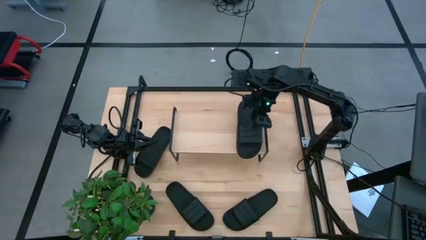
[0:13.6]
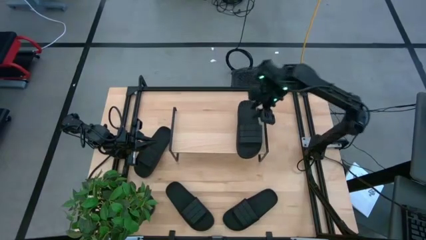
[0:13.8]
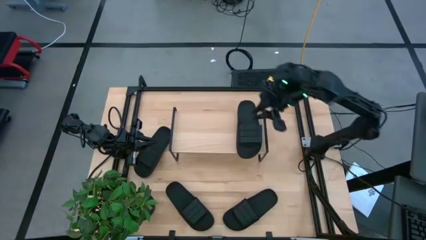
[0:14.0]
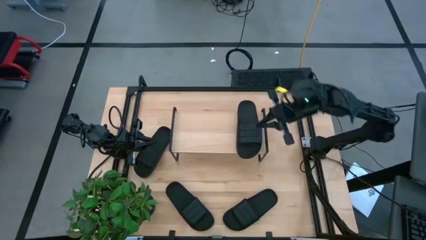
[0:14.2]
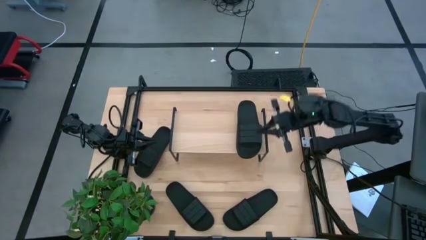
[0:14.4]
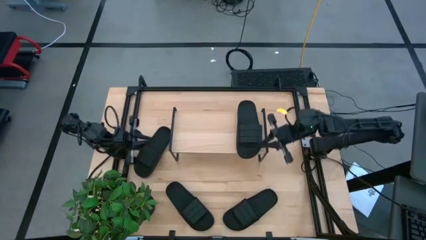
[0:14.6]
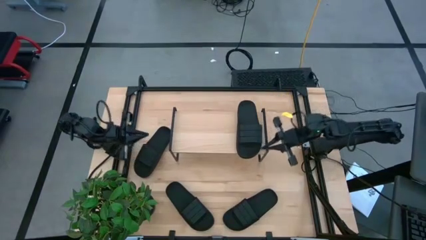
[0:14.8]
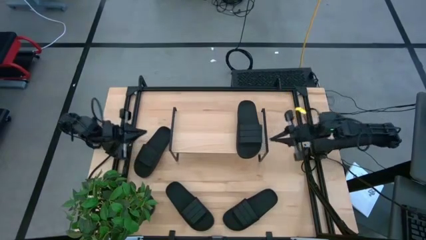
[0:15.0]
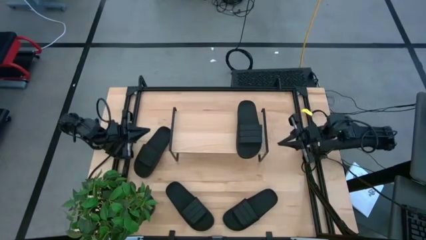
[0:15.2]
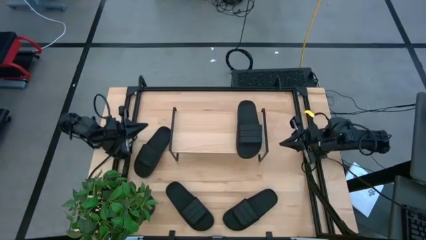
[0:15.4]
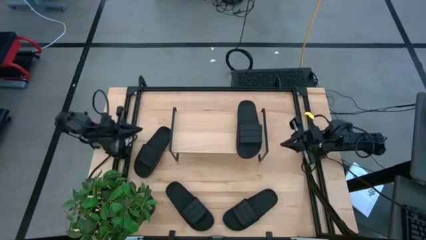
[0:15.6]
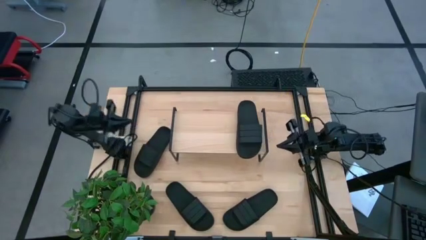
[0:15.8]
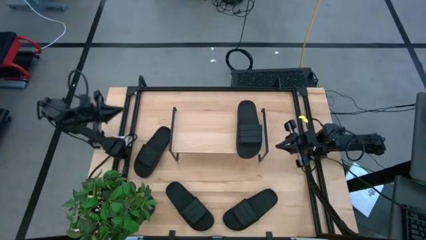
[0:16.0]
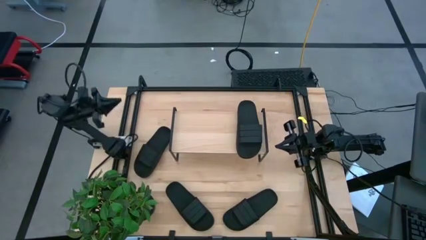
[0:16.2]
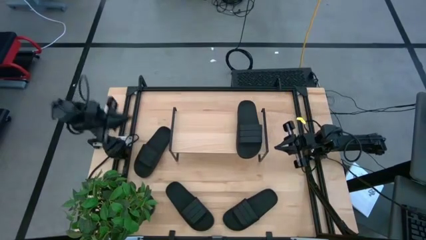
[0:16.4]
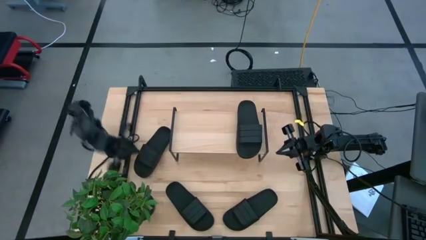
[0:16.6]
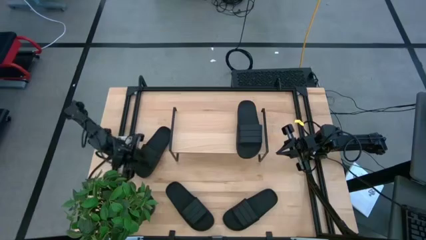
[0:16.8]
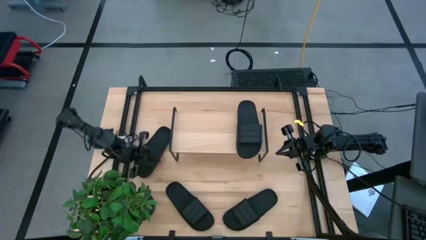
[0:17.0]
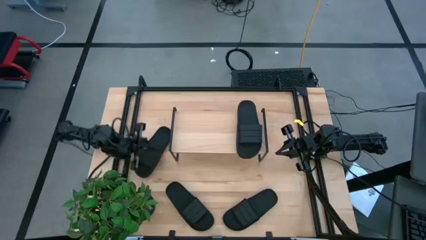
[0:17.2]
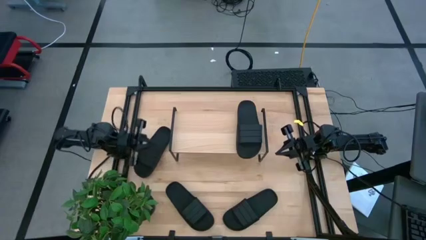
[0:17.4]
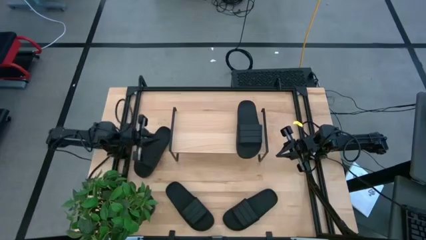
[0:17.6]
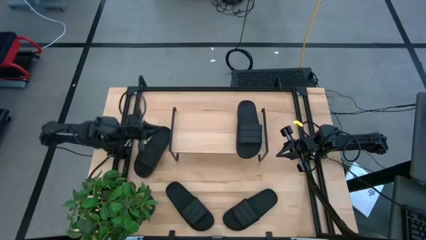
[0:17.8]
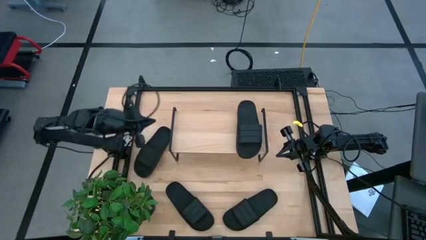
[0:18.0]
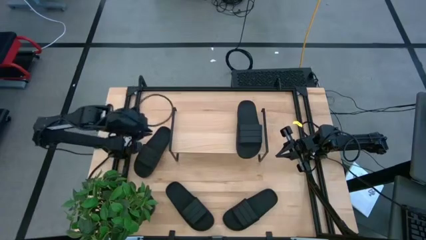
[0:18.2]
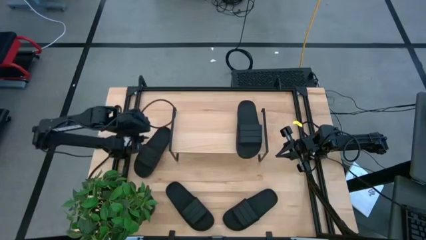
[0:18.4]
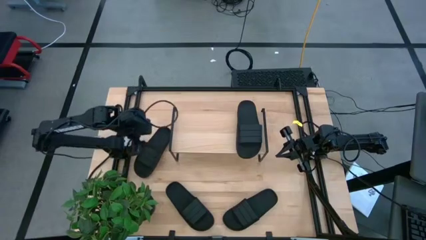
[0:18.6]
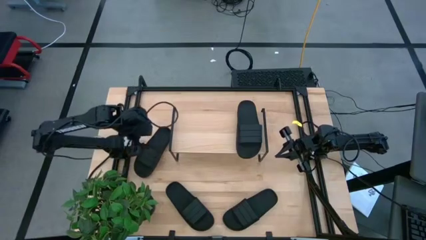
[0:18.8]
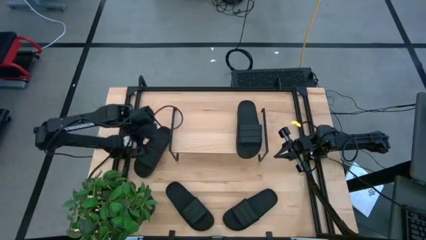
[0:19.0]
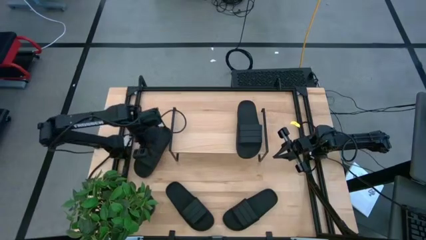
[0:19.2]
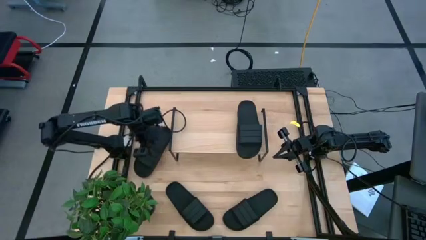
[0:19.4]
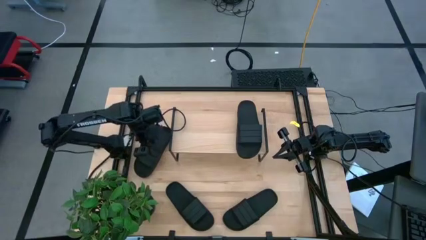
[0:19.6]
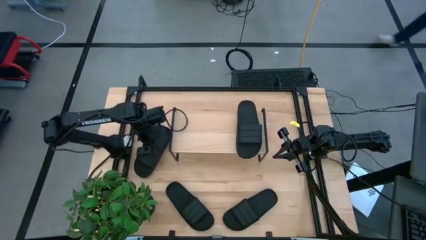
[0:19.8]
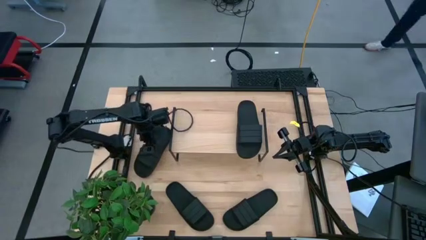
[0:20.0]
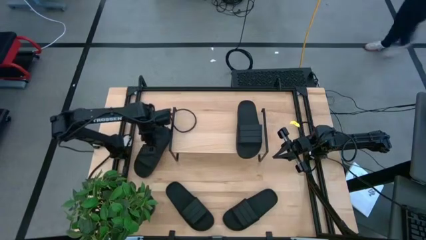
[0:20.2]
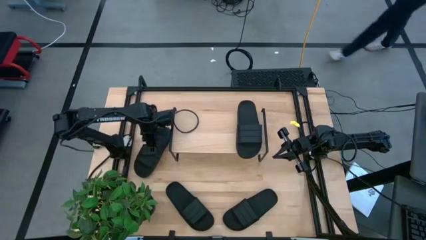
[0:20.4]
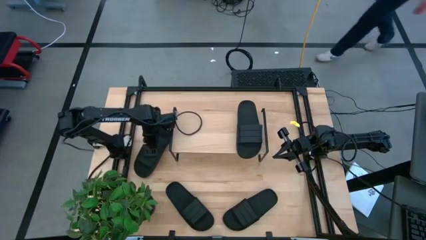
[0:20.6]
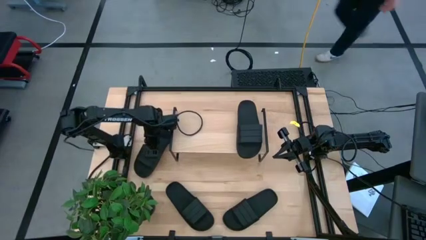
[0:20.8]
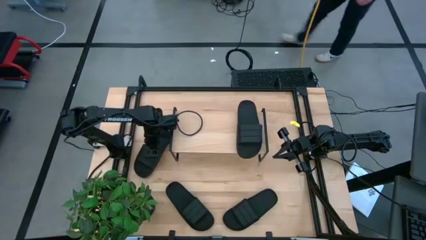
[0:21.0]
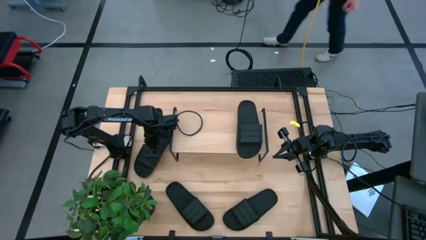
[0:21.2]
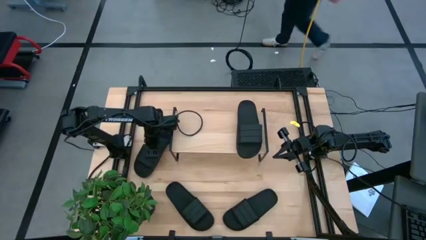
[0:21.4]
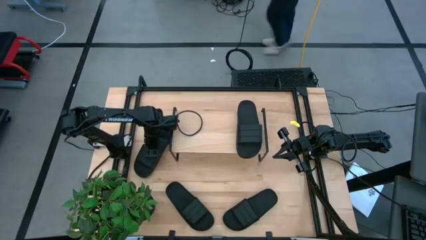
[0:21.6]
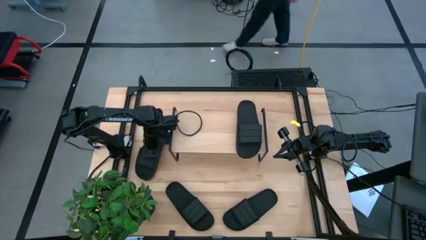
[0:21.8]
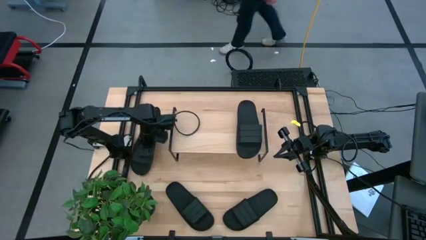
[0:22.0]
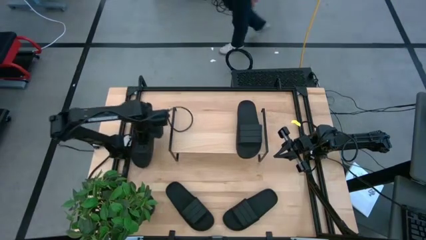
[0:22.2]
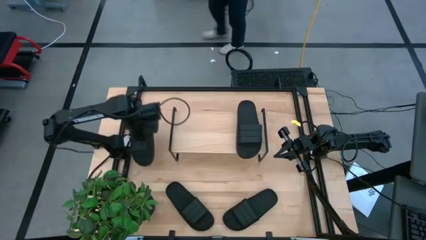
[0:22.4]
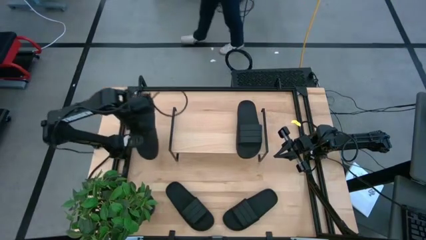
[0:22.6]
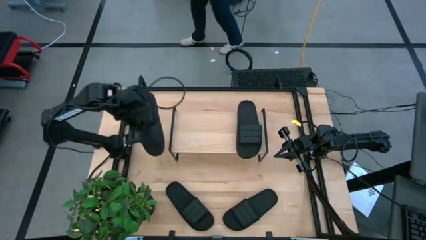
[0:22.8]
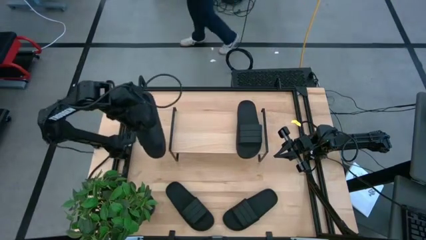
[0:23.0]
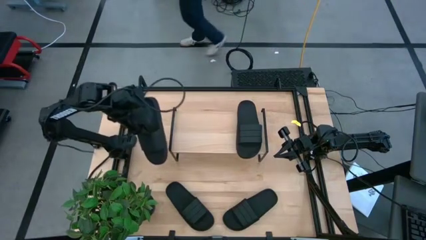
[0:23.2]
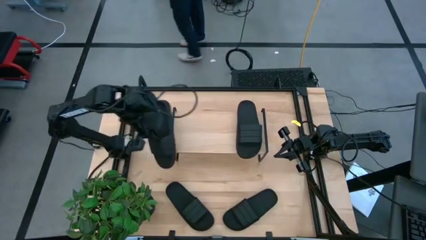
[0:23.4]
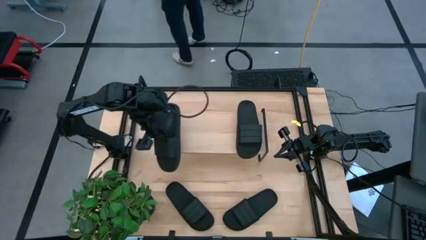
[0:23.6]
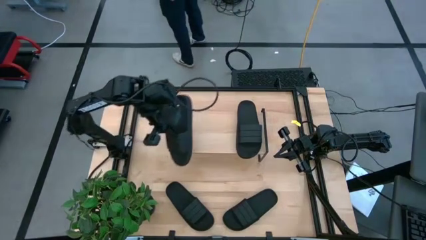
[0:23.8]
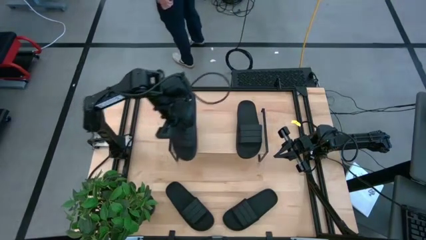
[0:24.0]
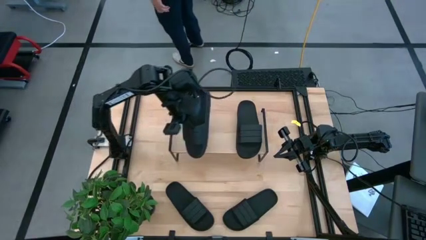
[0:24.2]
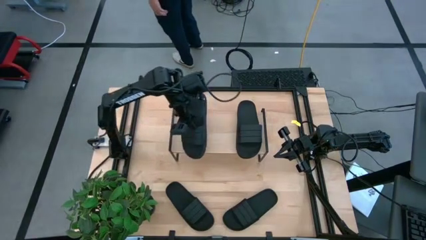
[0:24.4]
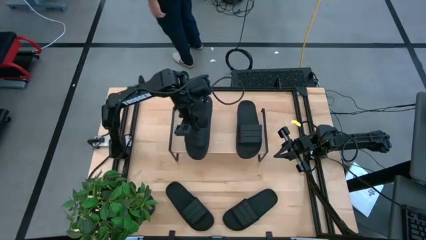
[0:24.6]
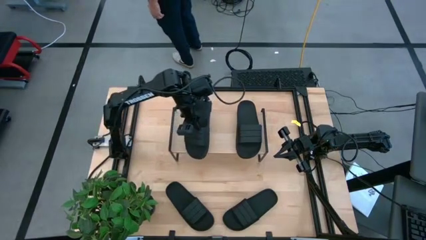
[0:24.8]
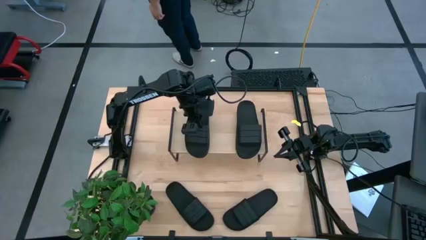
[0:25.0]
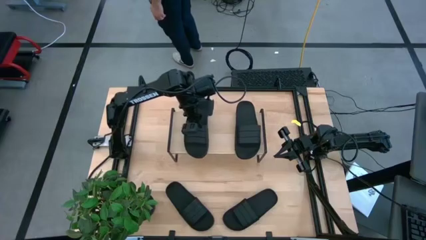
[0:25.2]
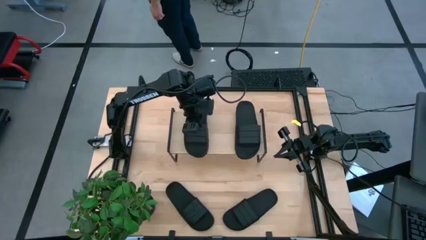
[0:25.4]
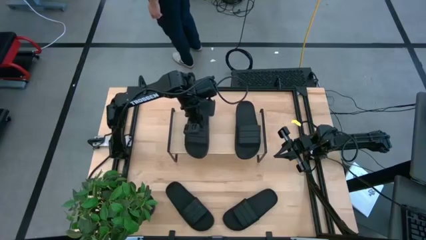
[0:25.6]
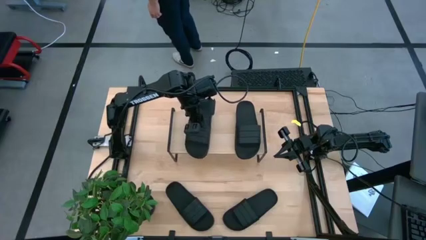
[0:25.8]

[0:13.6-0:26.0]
Task: Pick and place slides into the shelf
Put the top left slide on the shelf
